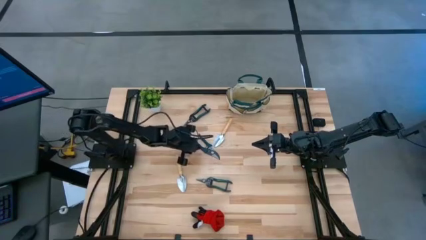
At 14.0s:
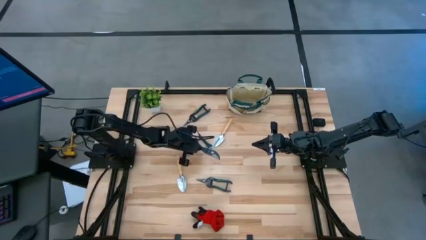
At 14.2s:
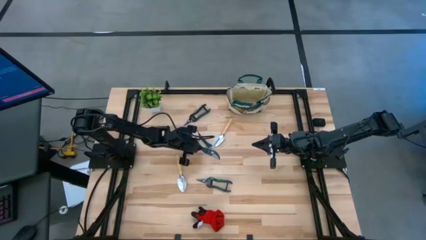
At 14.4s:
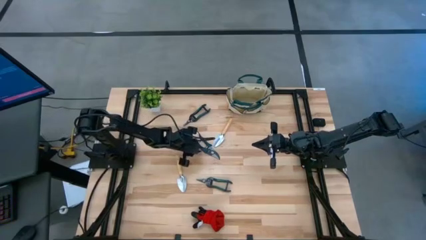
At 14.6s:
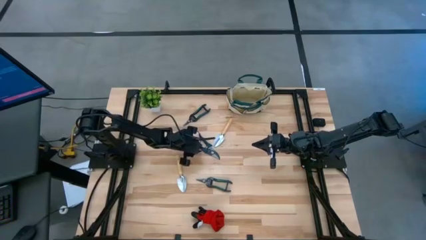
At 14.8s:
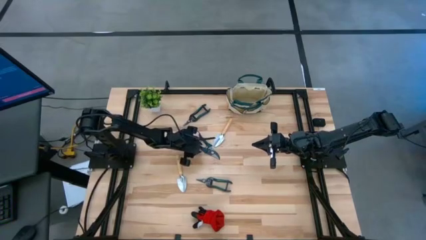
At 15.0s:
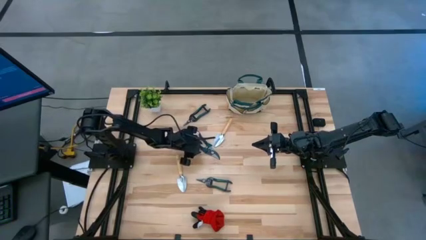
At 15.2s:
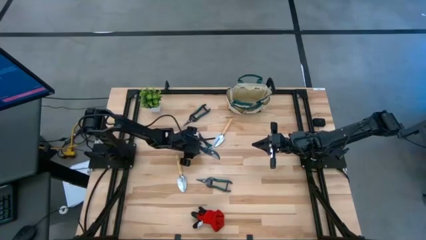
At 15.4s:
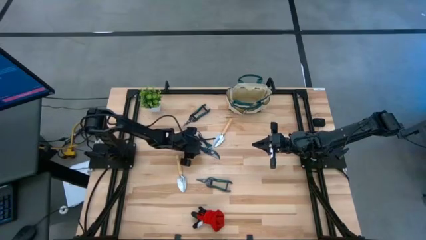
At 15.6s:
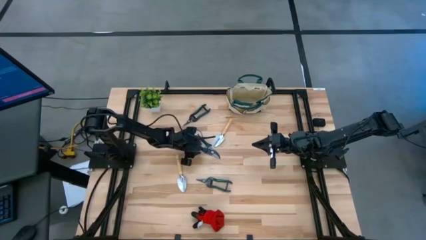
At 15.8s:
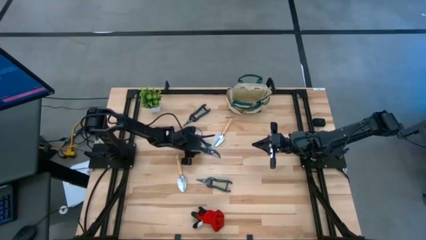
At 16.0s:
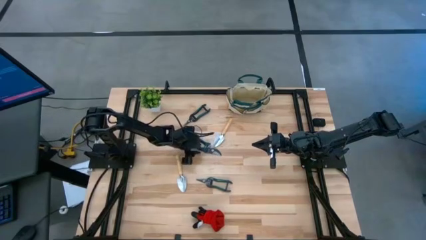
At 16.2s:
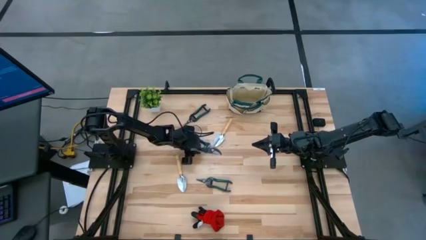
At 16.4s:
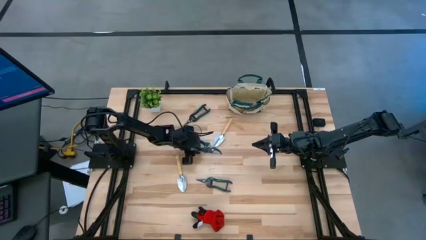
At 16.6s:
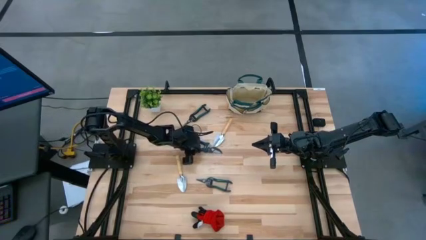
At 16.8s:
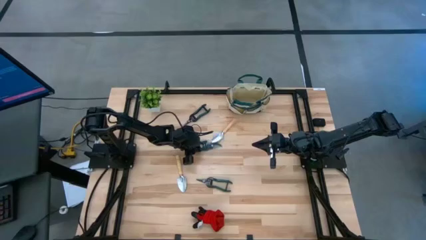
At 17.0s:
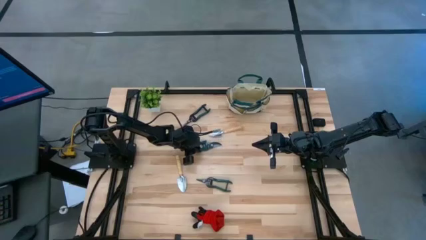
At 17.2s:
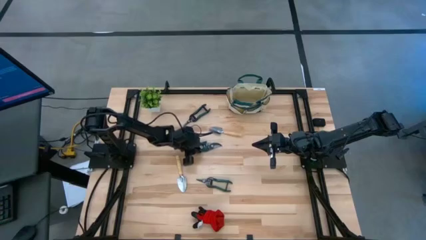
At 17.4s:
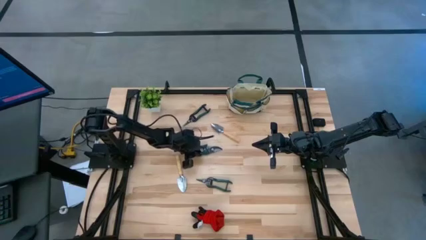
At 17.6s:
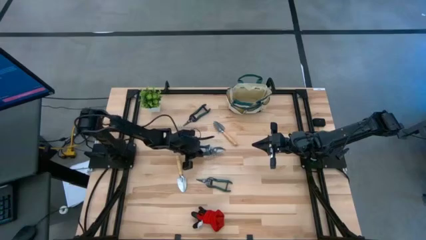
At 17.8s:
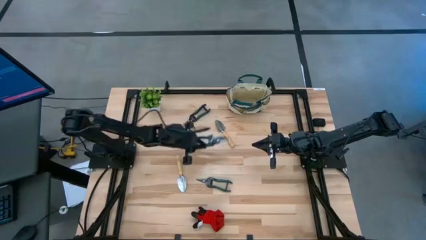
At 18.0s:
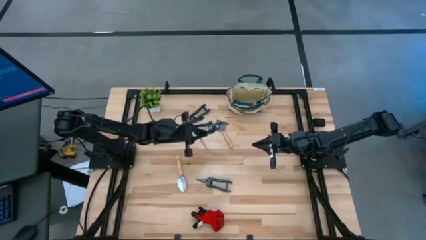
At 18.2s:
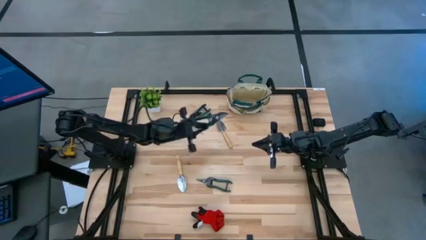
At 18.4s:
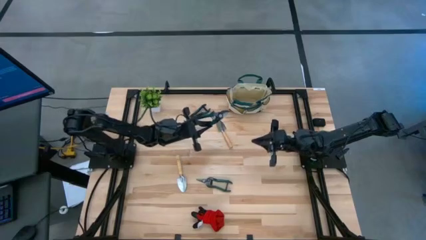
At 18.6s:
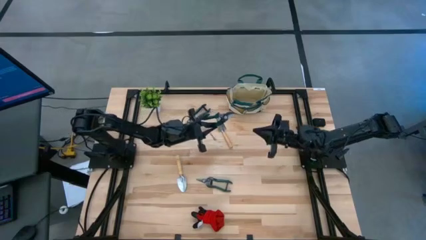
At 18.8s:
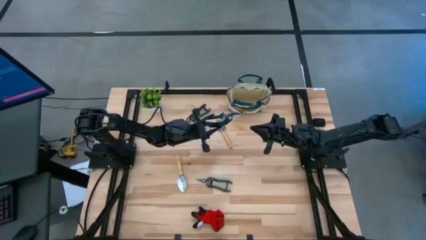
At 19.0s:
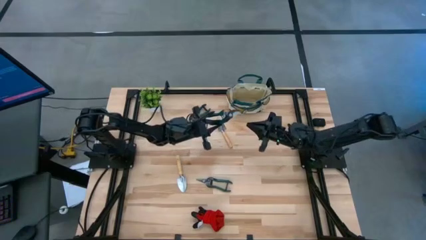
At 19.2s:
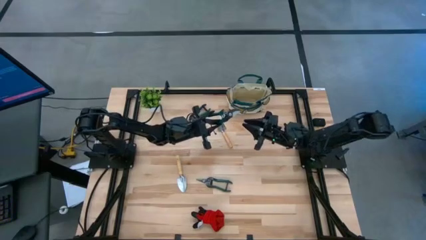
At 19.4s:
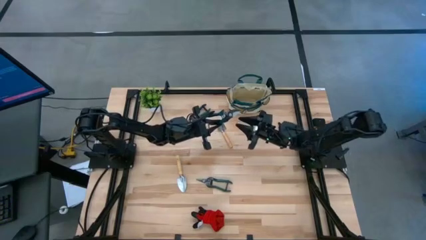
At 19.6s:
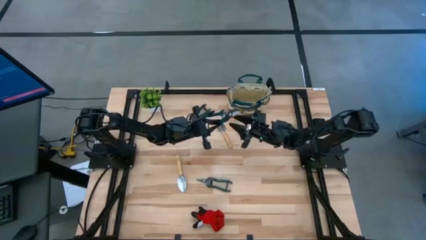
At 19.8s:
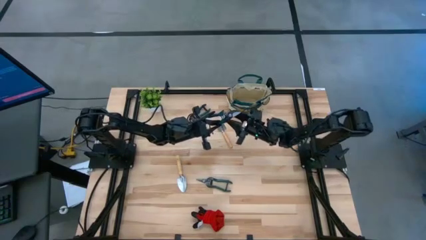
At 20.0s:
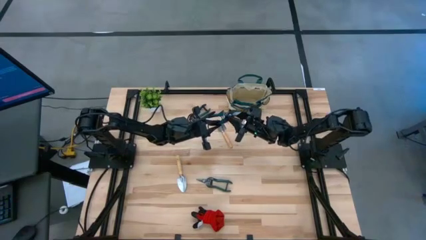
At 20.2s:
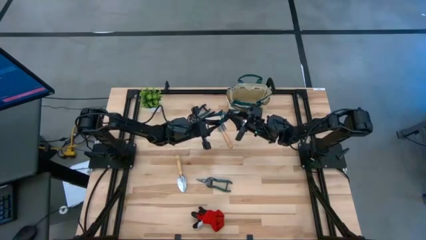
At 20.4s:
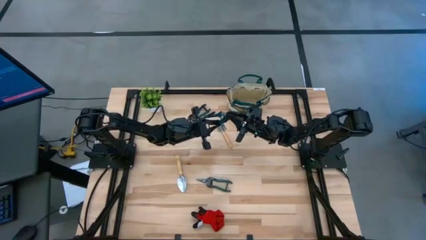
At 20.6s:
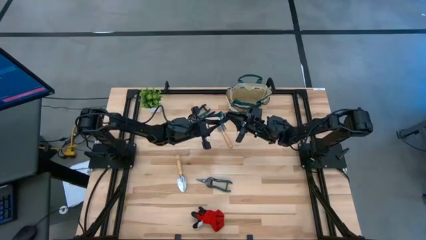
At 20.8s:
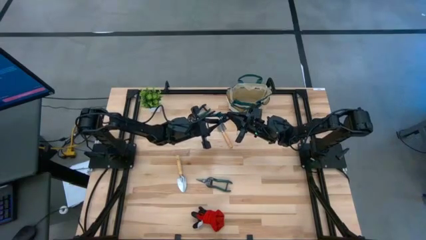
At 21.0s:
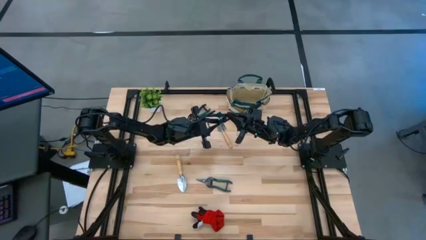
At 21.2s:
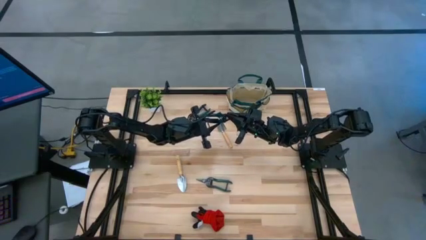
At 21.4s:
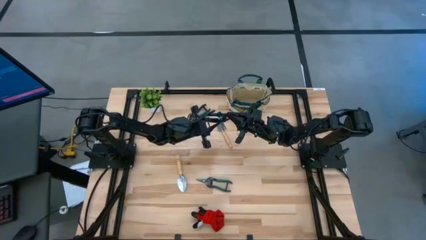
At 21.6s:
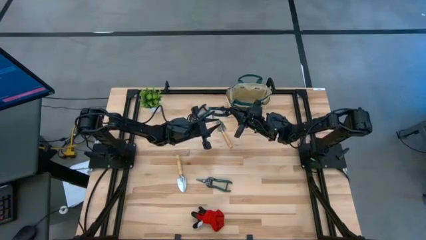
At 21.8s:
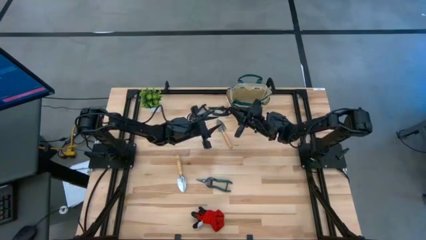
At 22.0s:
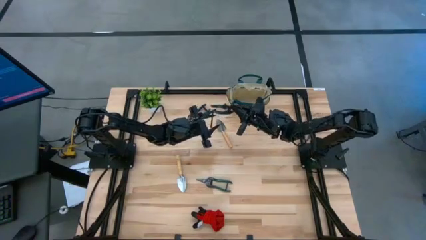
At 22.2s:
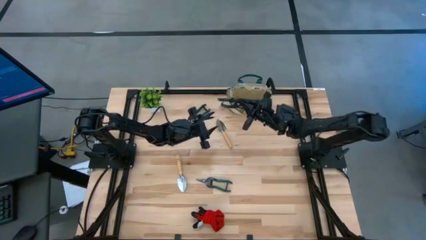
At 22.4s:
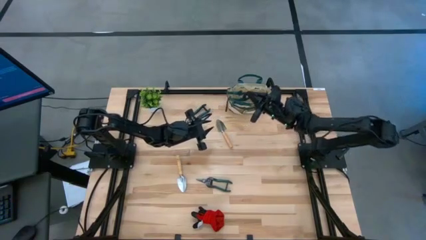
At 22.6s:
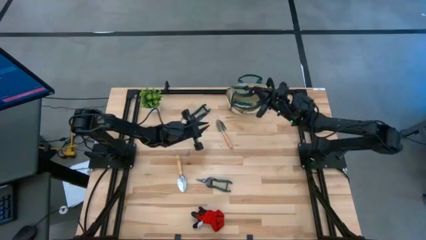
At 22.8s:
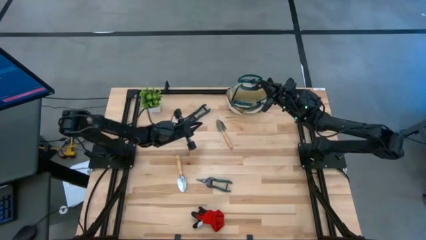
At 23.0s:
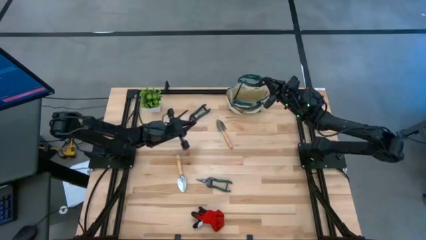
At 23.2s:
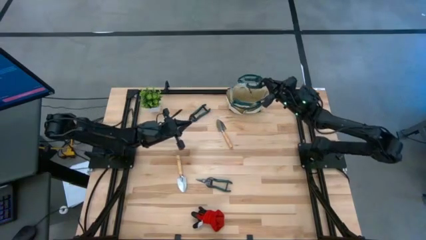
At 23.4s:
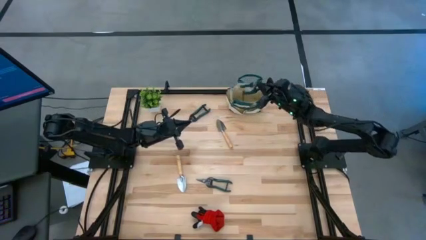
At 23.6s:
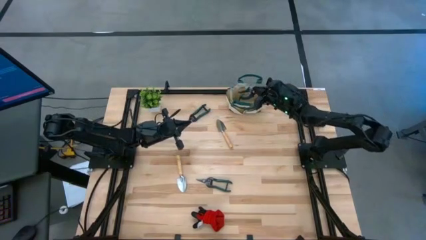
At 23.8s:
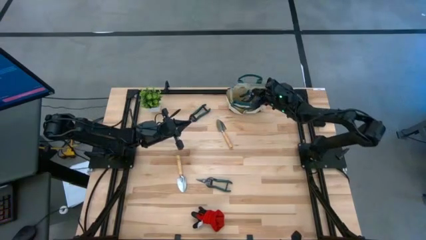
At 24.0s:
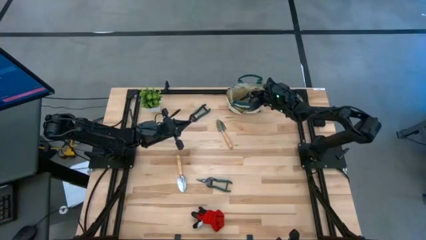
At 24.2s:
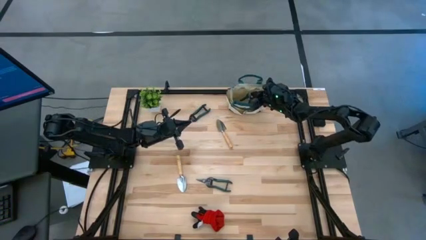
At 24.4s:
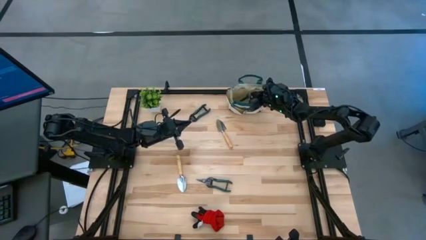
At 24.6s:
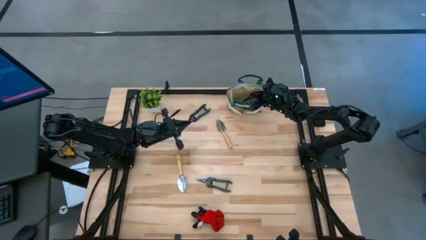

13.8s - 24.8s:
Task: Pick & Place Garden tools in Gardening bag
Put the middle green shears into the gardening bag

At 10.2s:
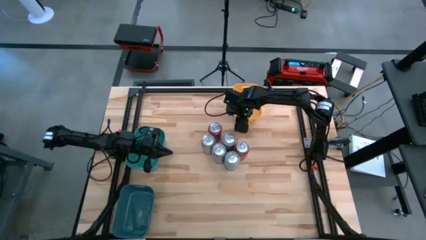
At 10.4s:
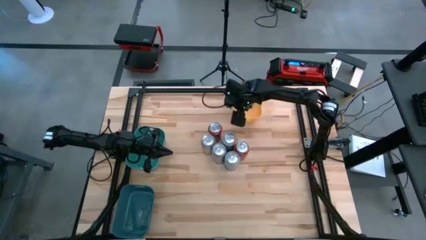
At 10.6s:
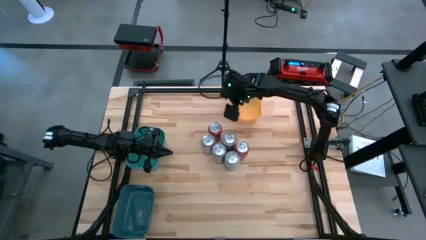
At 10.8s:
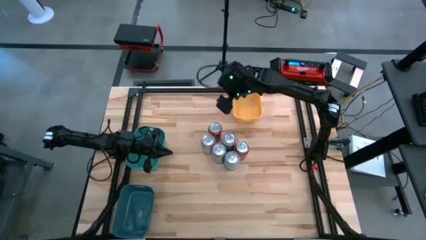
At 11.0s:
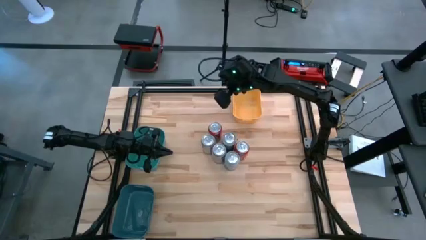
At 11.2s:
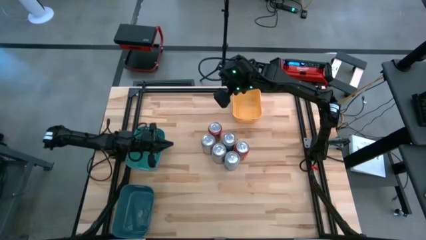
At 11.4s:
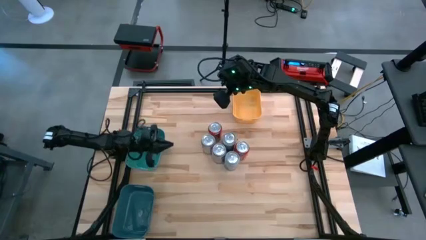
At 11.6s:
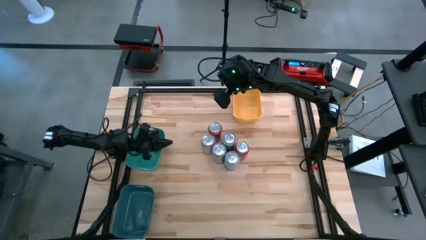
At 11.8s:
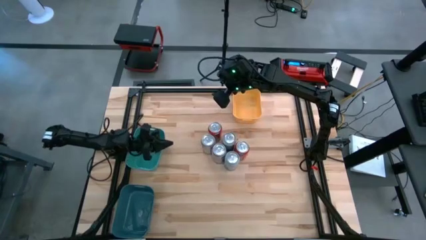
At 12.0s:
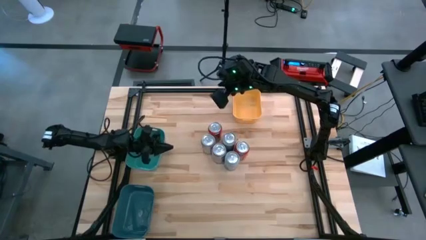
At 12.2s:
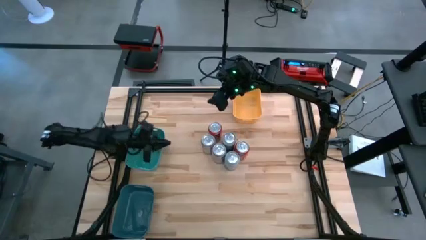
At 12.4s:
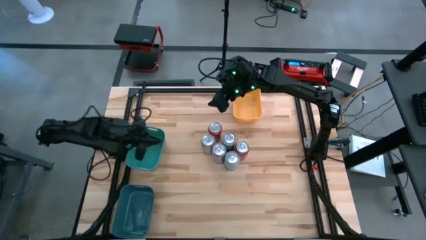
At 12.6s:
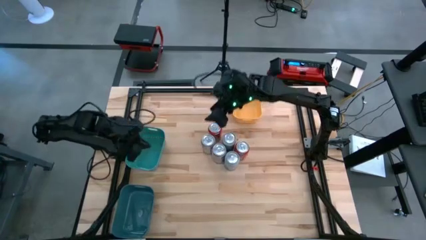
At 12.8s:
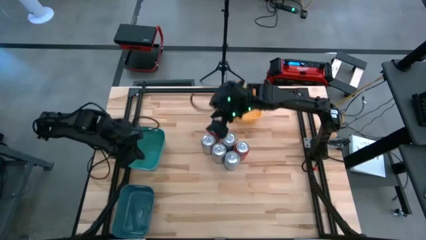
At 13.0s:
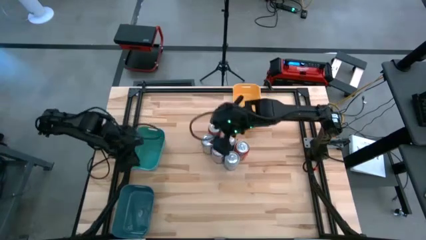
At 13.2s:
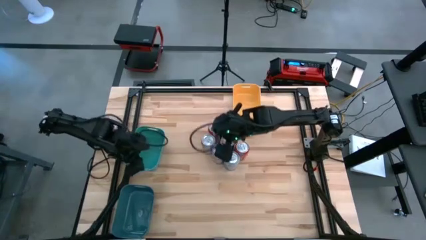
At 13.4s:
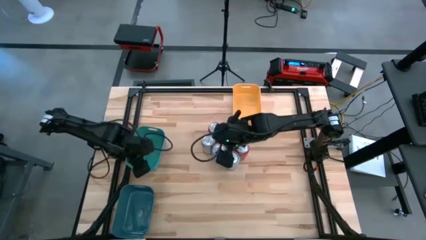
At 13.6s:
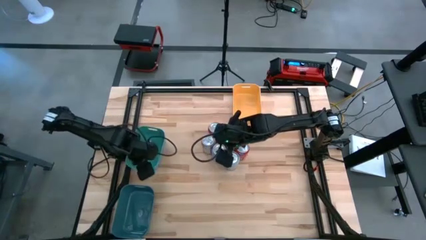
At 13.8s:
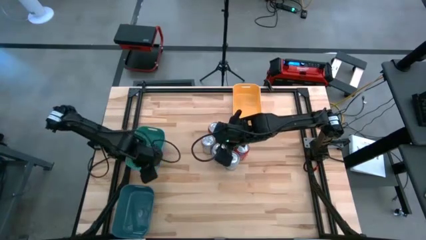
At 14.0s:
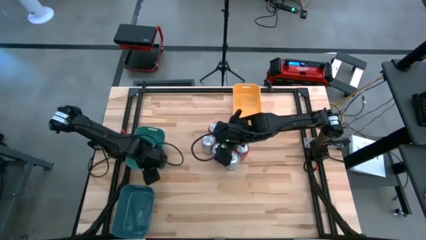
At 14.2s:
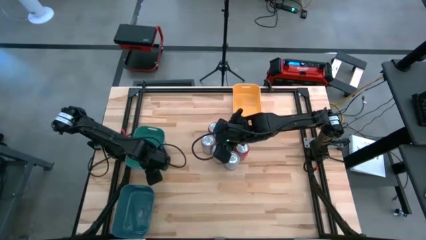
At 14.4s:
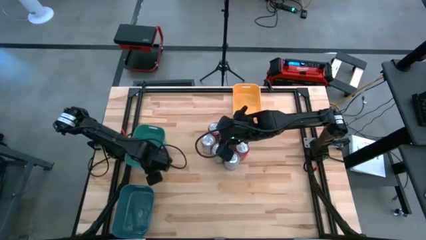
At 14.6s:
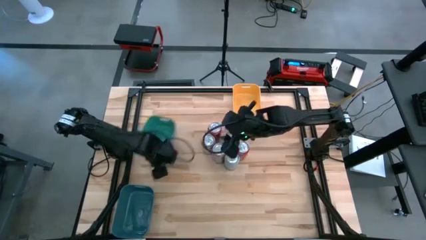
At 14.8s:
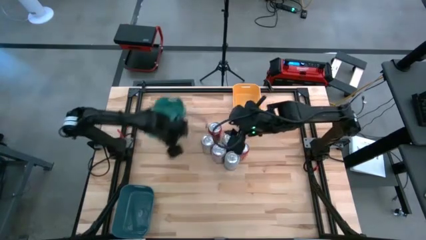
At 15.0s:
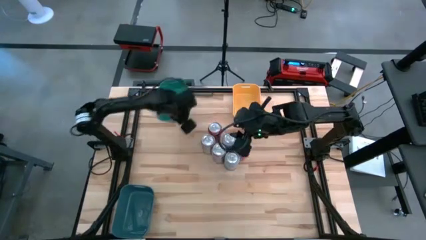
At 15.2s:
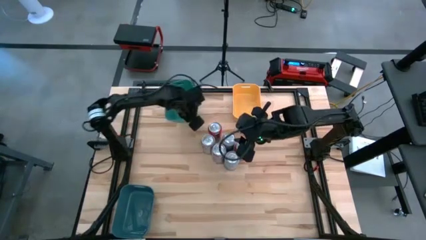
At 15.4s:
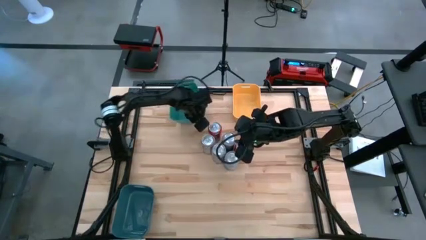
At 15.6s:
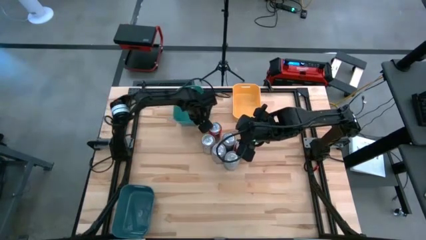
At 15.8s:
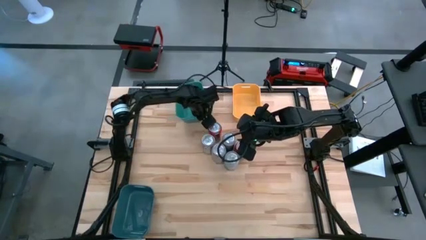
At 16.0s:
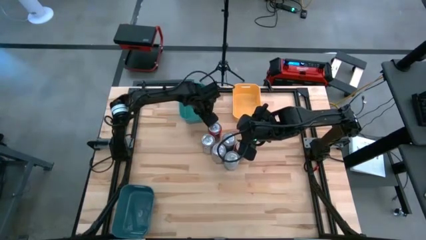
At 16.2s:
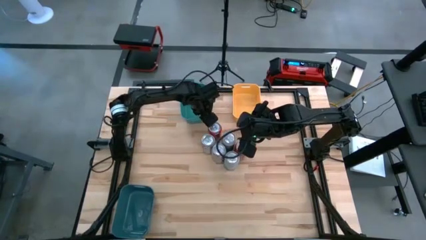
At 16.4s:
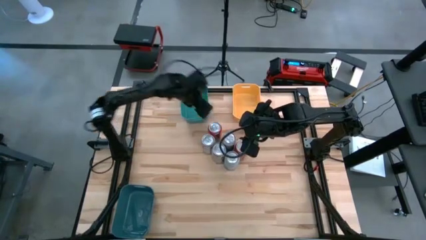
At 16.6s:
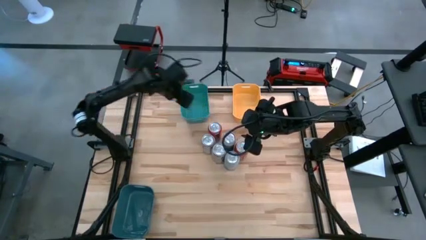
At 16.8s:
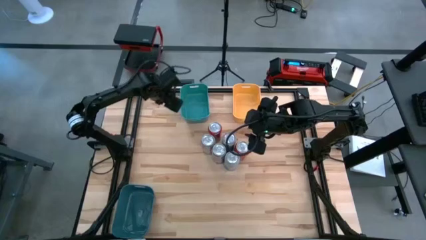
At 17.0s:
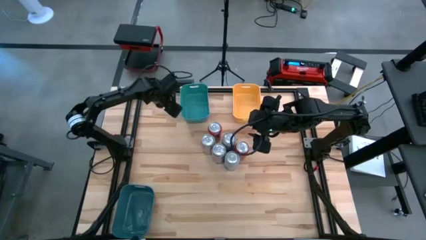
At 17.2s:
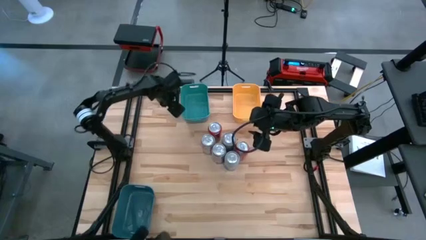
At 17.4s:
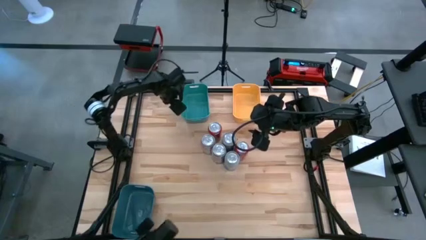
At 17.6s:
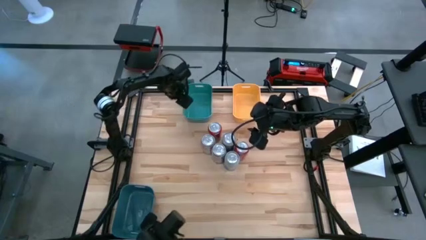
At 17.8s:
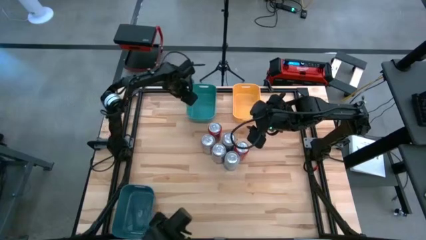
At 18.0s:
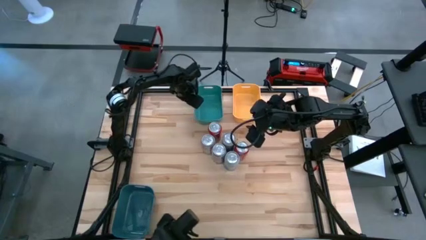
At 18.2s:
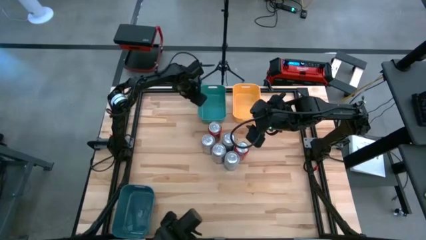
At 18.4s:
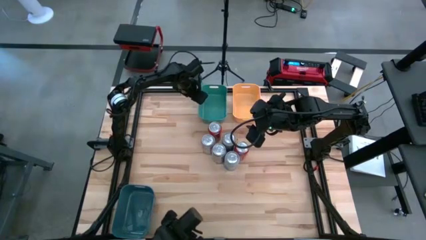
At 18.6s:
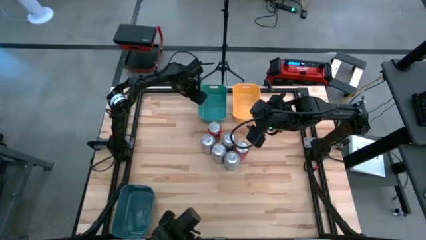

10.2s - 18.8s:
Task: Sort soda cans
Move the green bin to the middle top of the table
